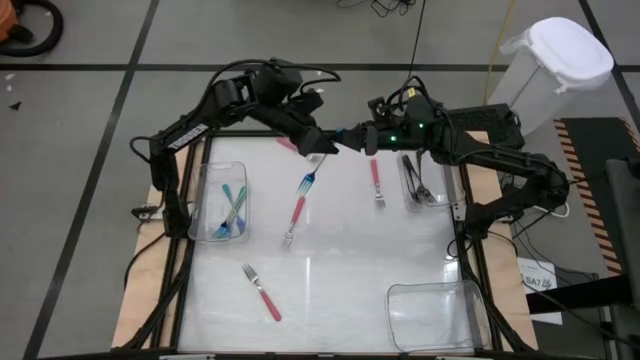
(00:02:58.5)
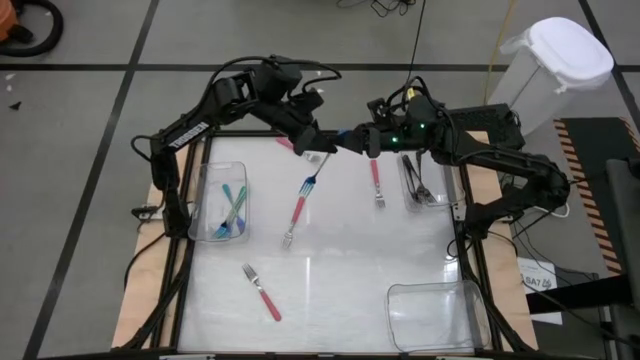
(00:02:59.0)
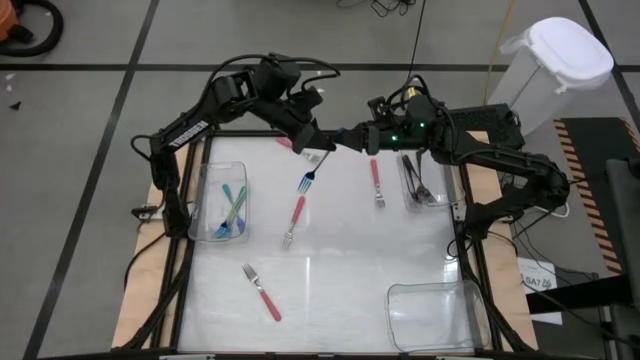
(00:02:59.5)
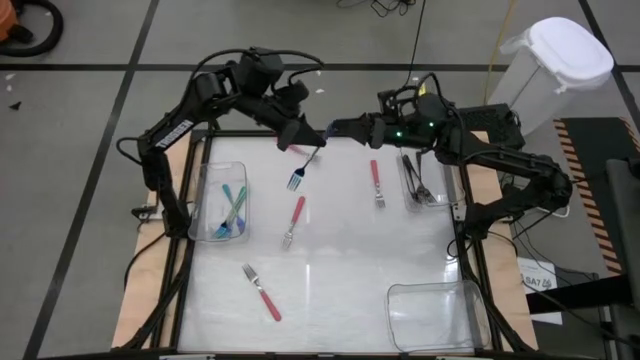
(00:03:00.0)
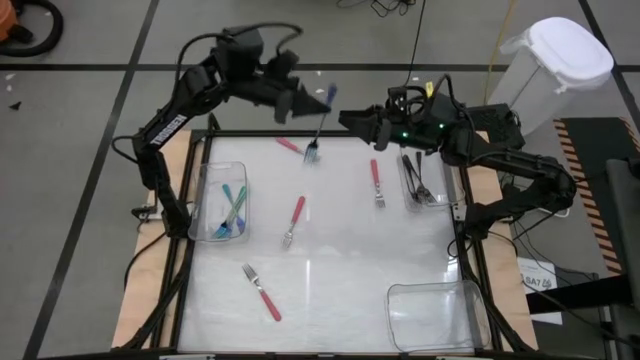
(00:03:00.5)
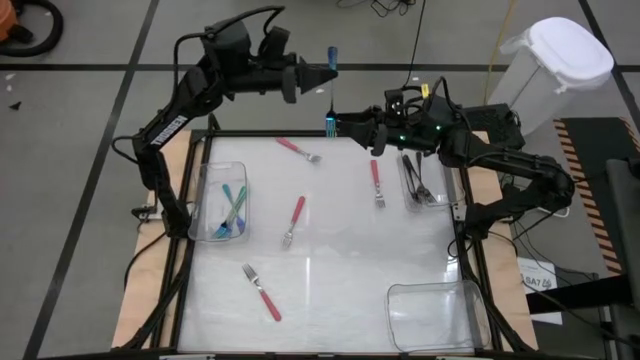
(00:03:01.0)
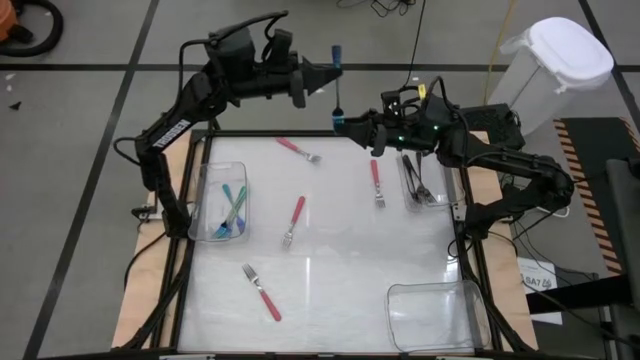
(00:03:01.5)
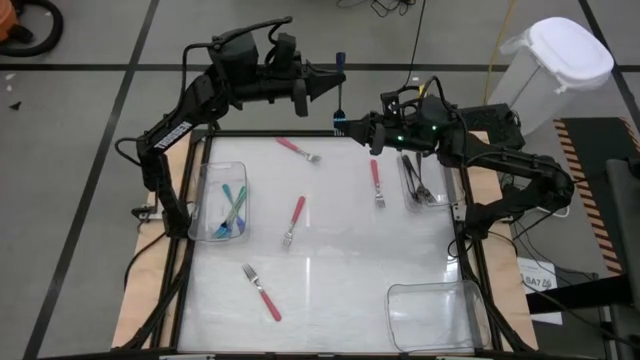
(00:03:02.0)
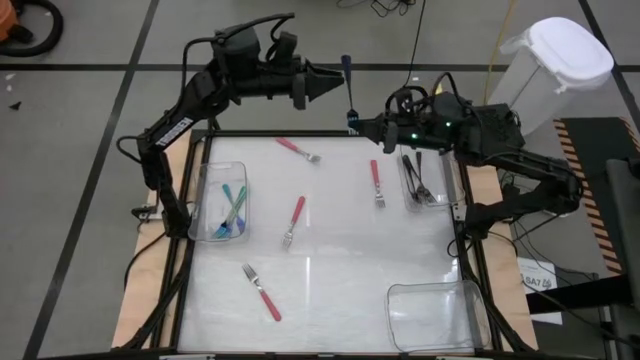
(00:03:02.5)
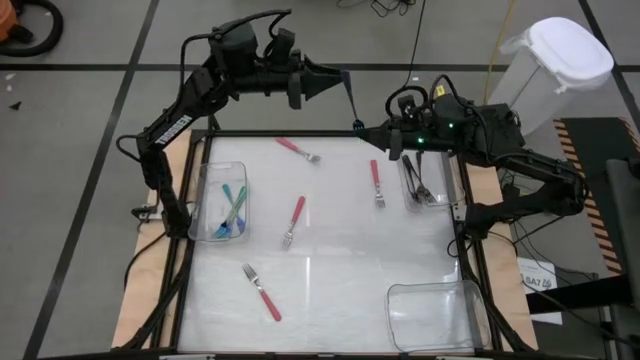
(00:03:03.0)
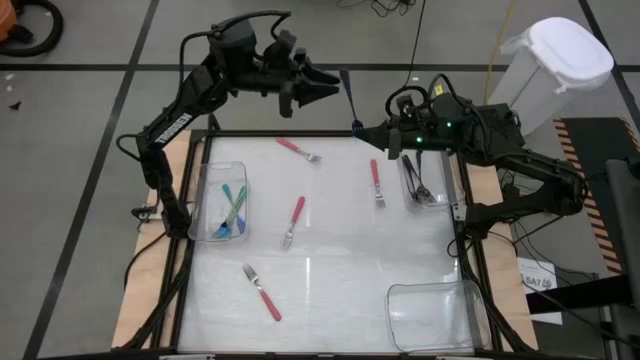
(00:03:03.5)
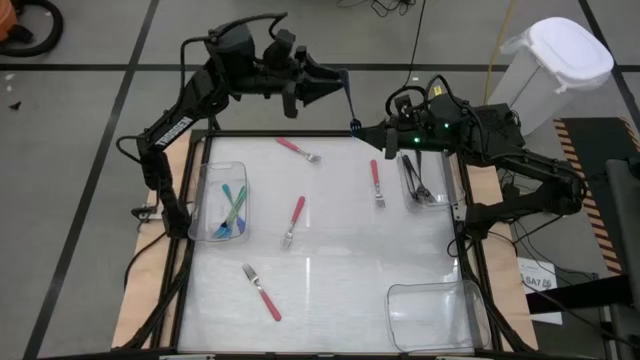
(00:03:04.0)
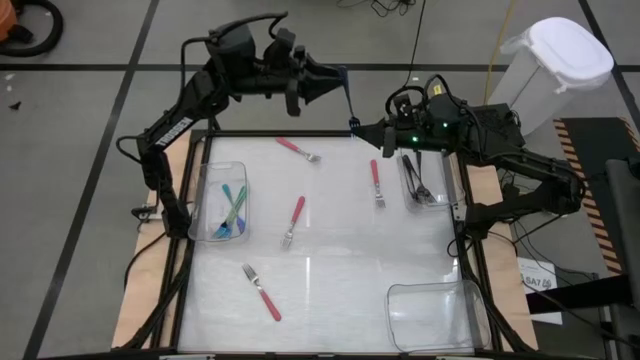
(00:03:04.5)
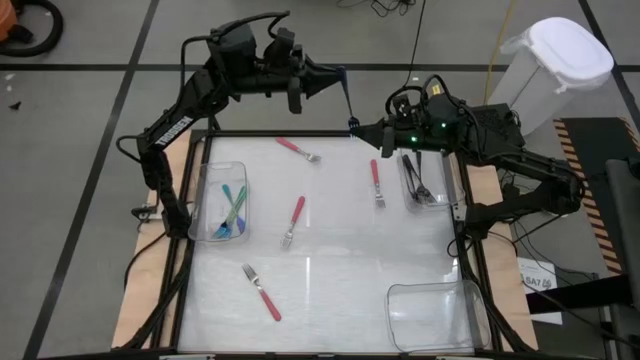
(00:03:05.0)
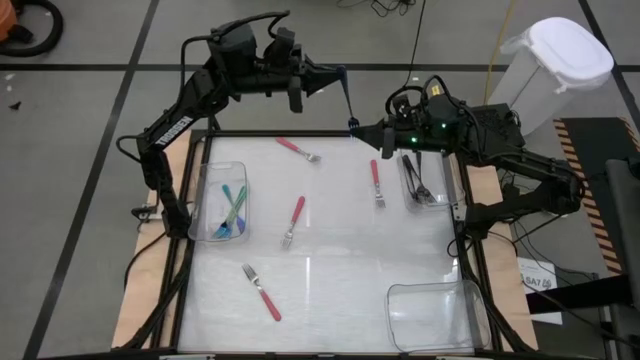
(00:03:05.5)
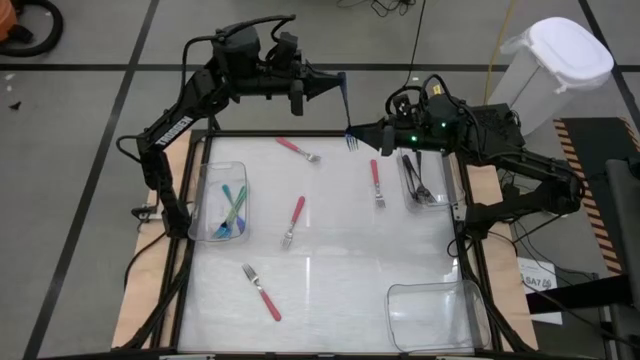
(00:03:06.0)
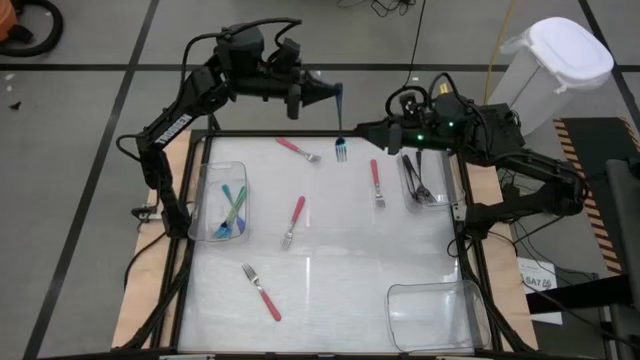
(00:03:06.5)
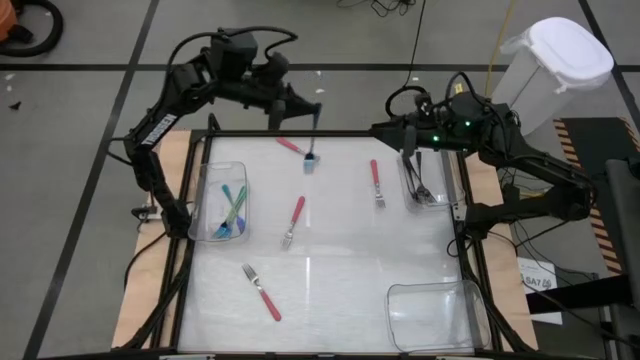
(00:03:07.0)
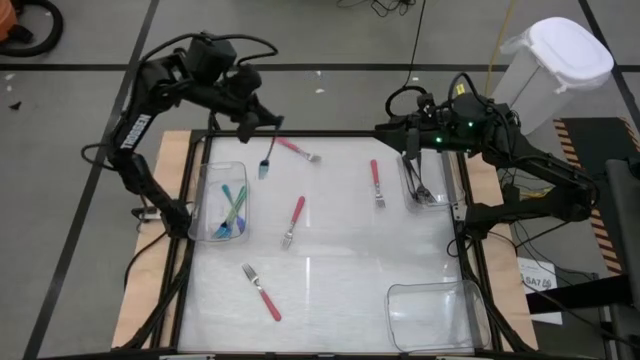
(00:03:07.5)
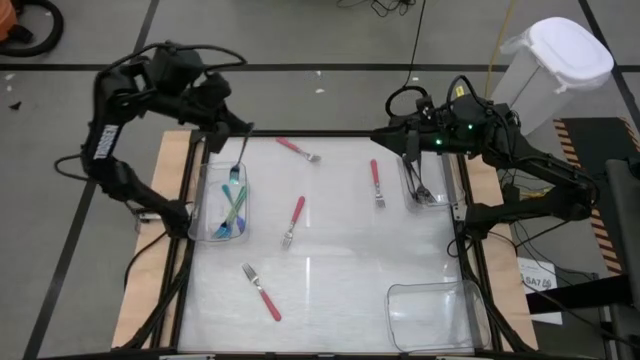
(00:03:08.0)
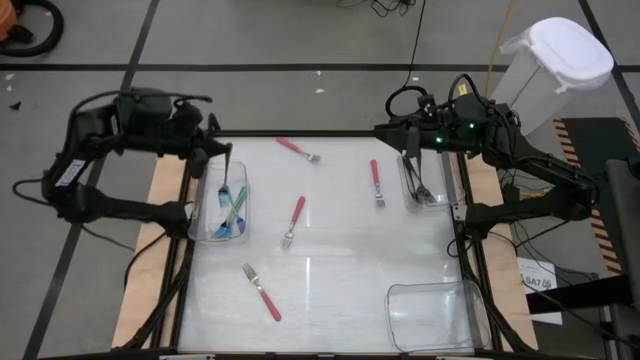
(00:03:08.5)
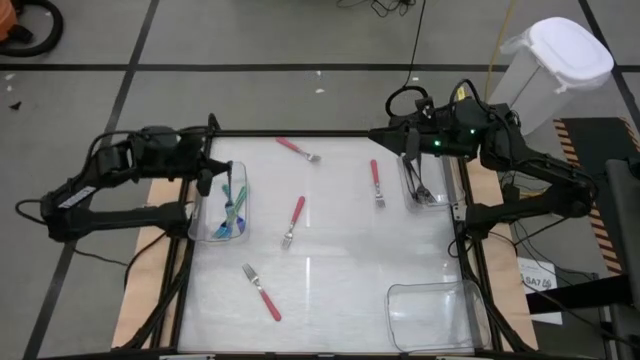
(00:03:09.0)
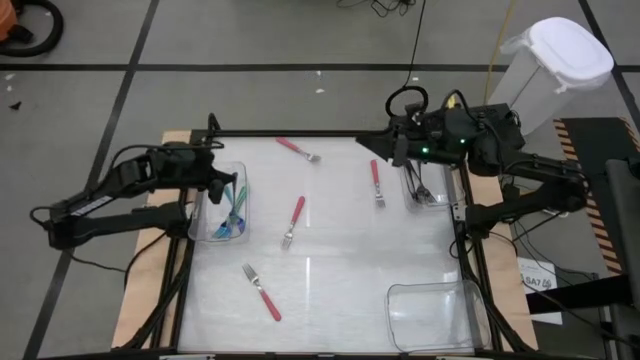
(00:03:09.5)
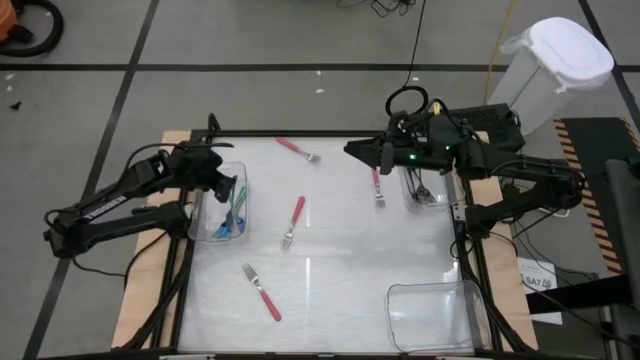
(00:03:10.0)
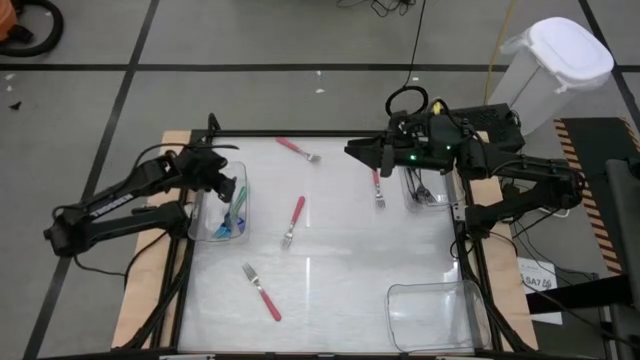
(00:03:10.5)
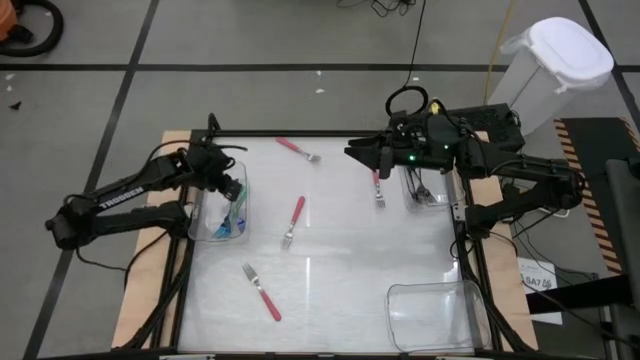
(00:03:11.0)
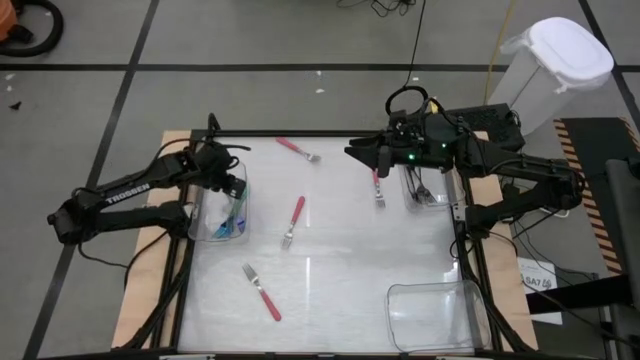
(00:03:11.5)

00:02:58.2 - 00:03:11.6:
Task: Sort silverware by color (type)
Put the blue fork into the left transparent bin

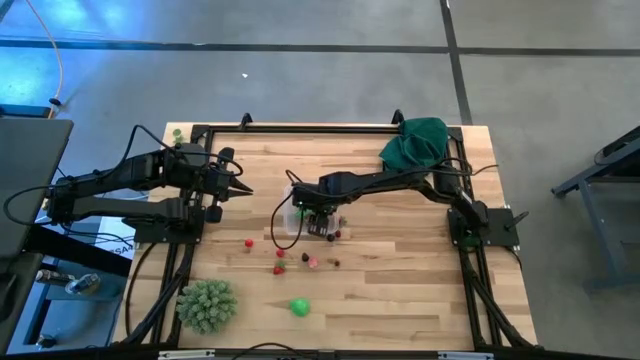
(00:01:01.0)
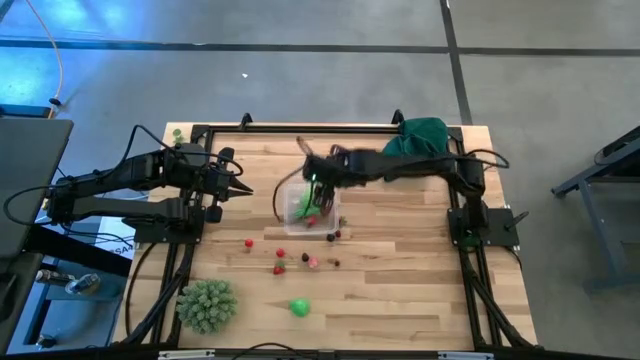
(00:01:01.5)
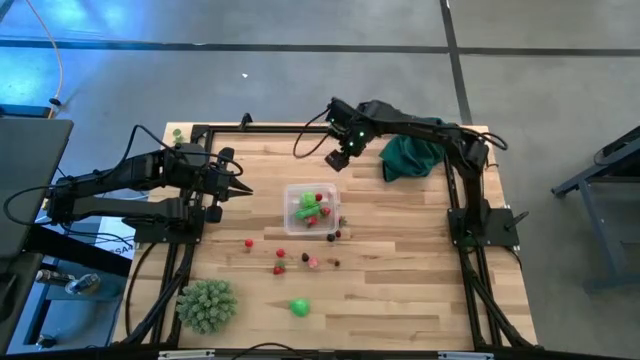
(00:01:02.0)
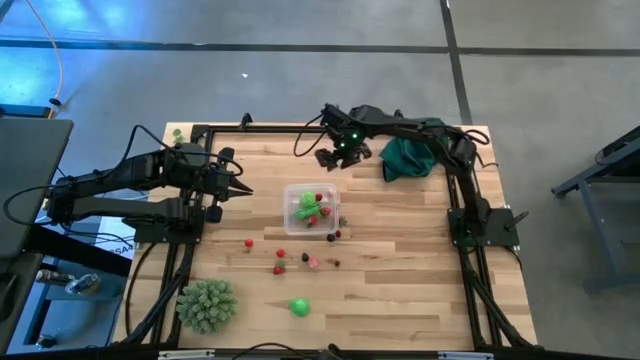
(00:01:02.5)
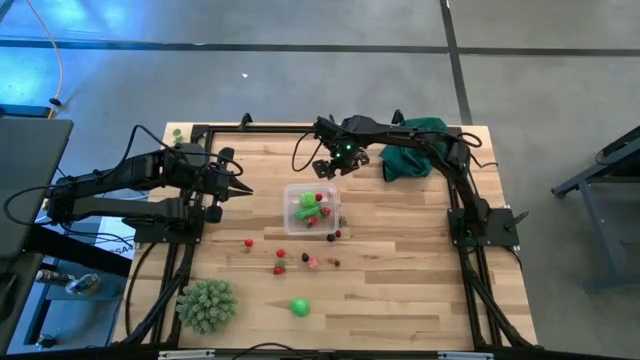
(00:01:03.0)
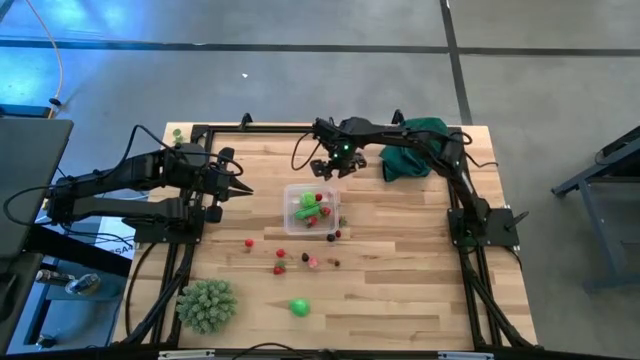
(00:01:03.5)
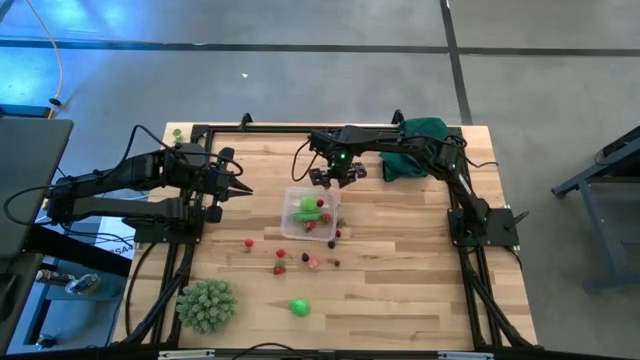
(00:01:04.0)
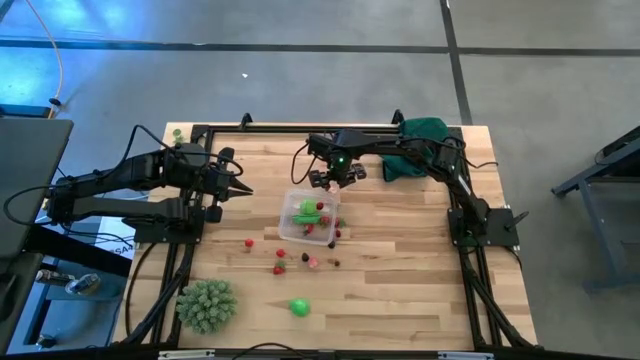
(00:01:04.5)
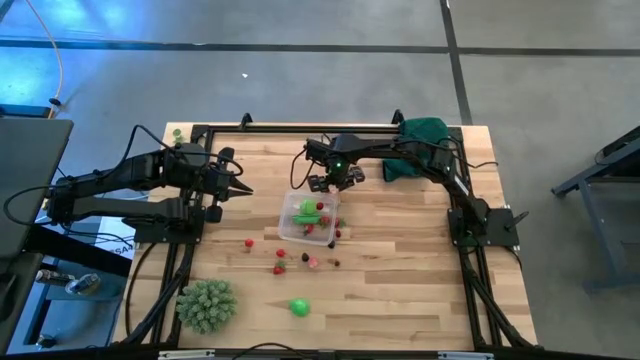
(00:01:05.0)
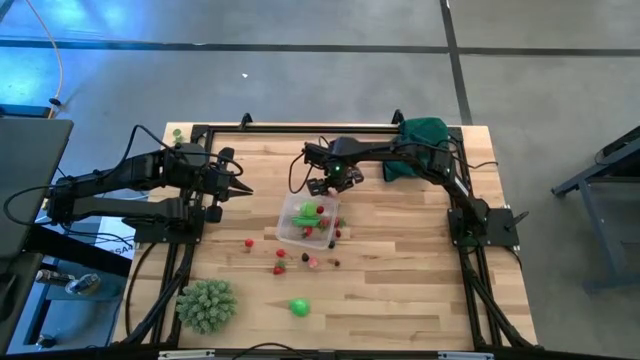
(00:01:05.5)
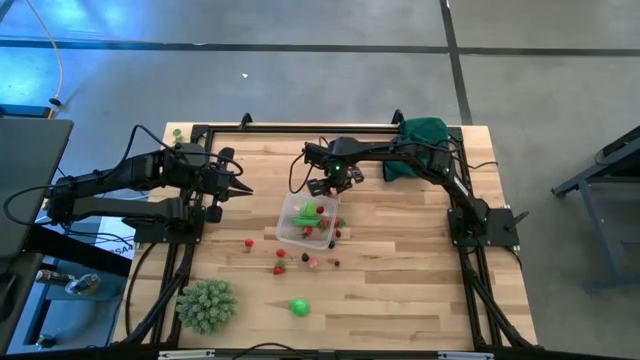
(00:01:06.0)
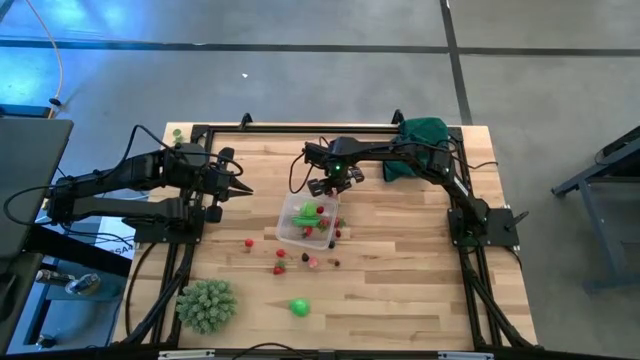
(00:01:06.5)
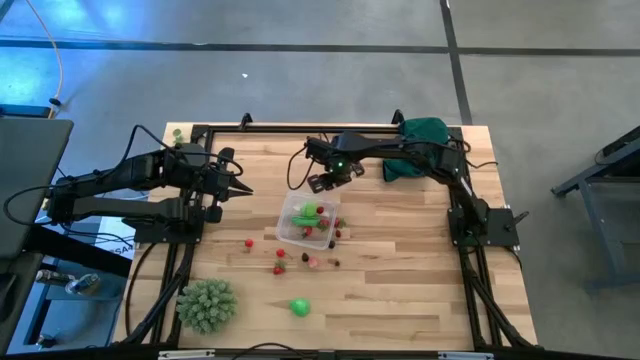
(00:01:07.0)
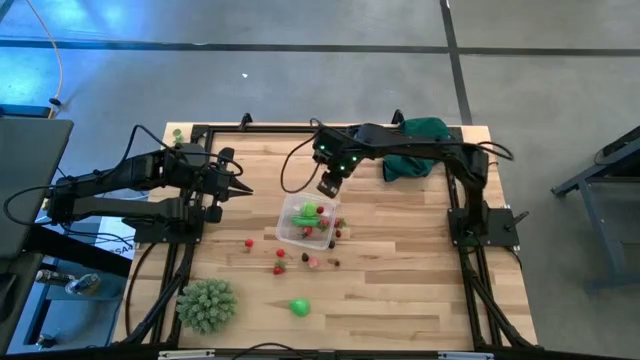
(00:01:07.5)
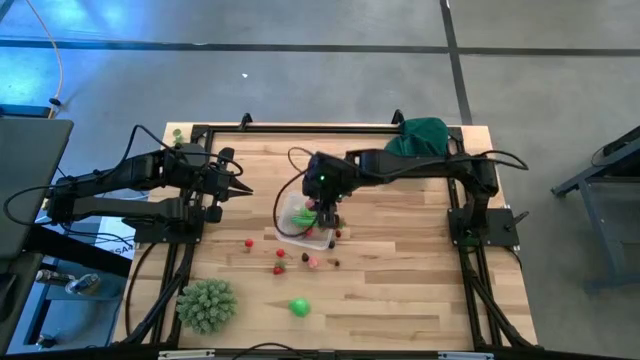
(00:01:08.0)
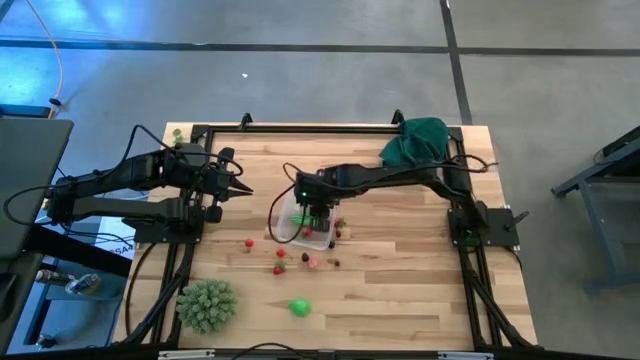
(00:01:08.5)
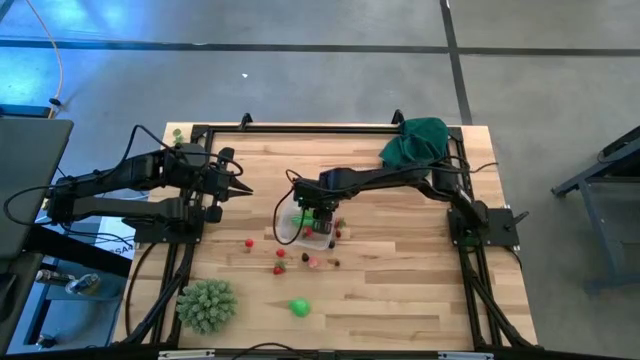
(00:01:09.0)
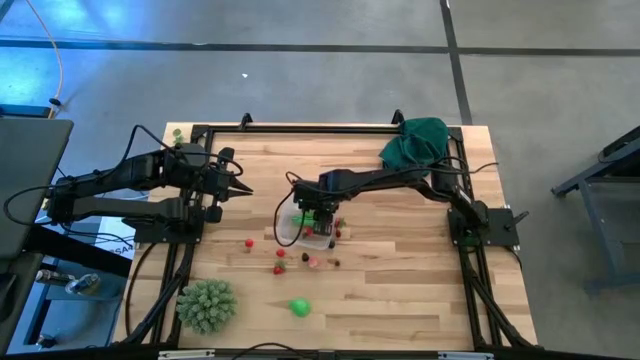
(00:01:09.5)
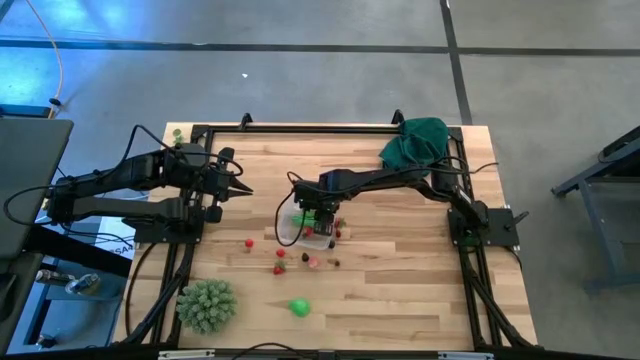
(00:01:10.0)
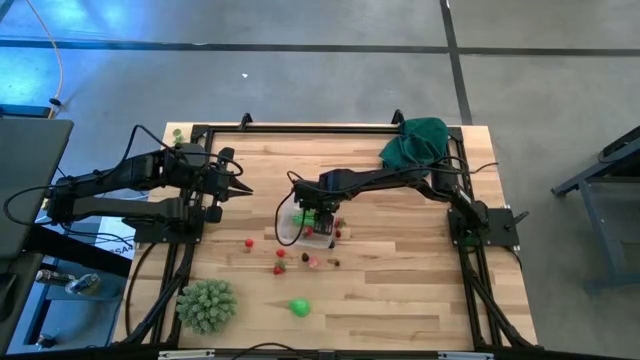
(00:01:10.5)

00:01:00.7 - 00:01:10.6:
Task: Pick and placing Produce into tupperware
Put the pink peach into the transparent container
